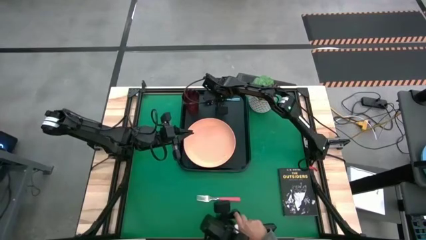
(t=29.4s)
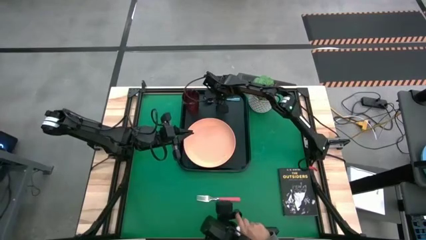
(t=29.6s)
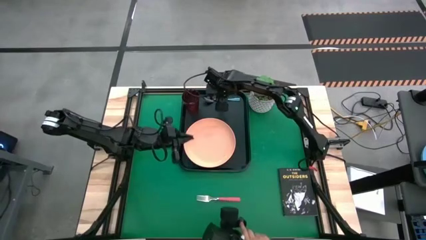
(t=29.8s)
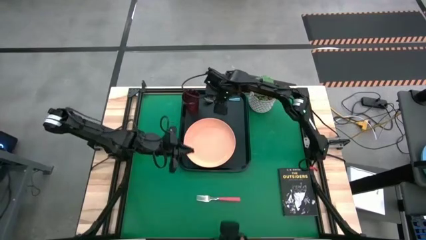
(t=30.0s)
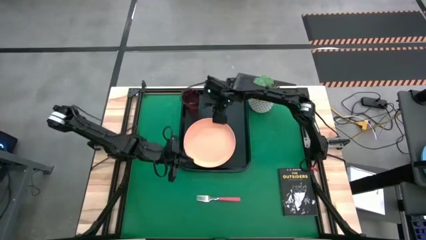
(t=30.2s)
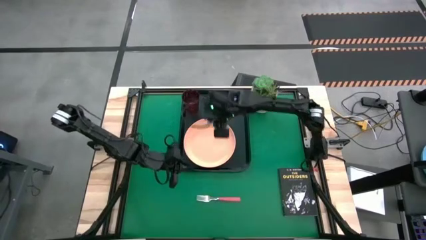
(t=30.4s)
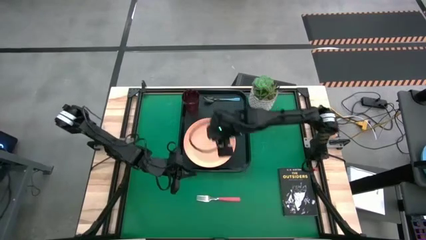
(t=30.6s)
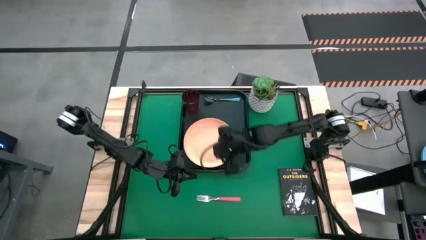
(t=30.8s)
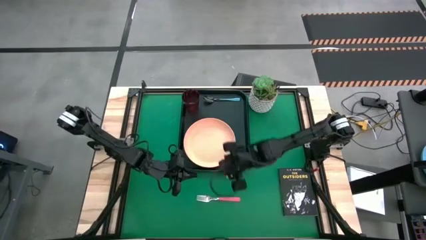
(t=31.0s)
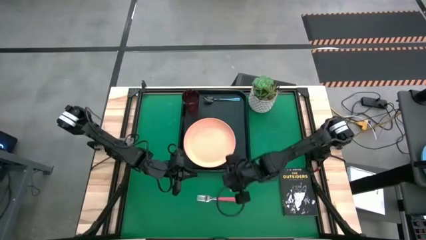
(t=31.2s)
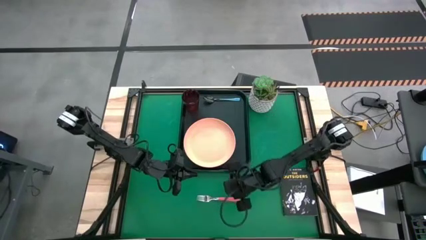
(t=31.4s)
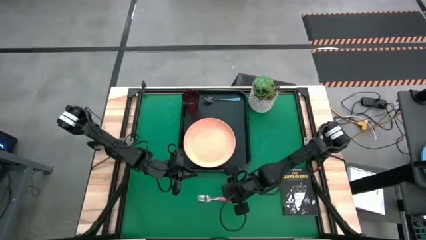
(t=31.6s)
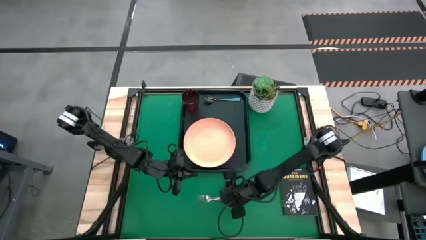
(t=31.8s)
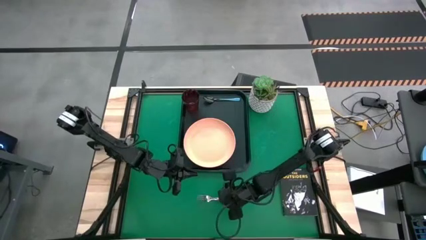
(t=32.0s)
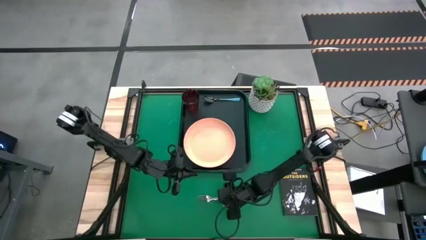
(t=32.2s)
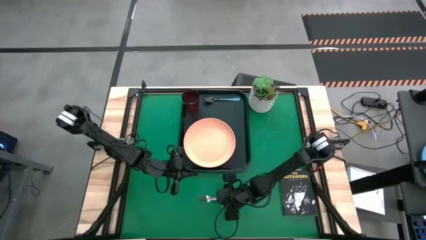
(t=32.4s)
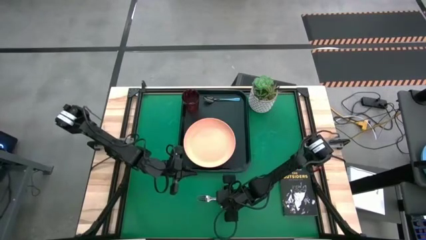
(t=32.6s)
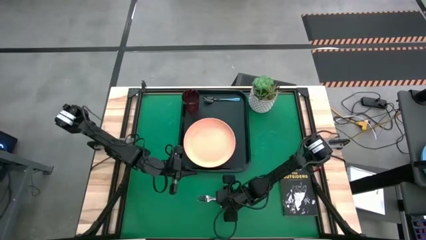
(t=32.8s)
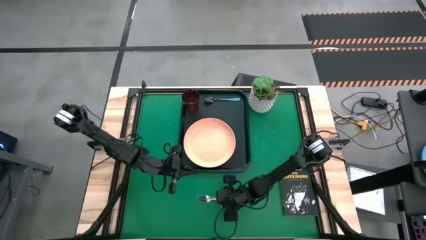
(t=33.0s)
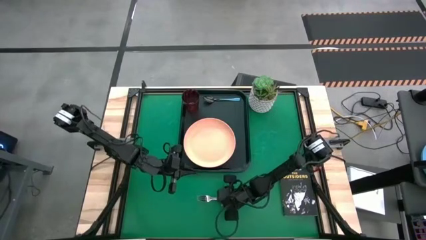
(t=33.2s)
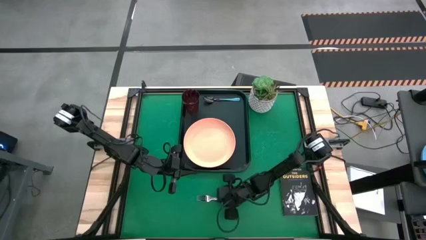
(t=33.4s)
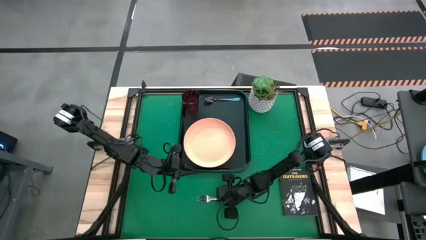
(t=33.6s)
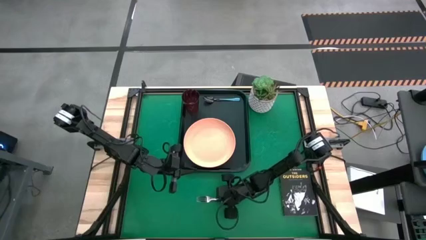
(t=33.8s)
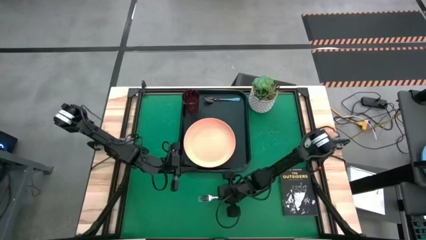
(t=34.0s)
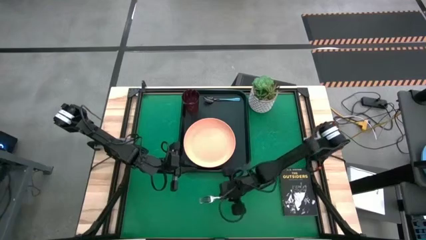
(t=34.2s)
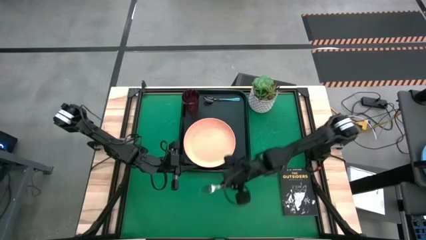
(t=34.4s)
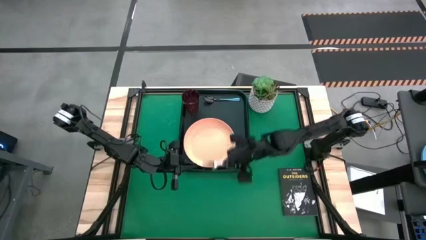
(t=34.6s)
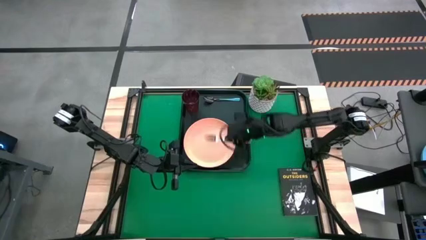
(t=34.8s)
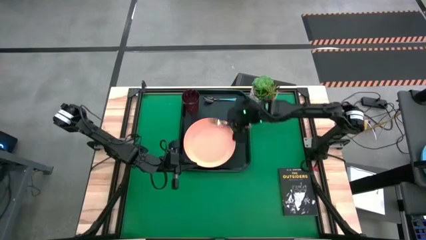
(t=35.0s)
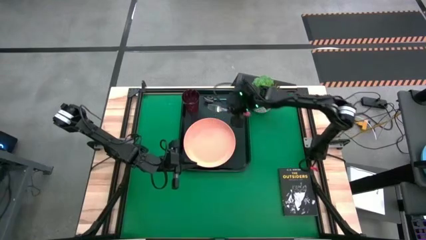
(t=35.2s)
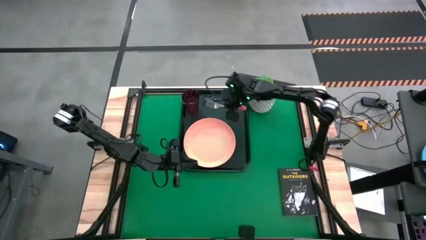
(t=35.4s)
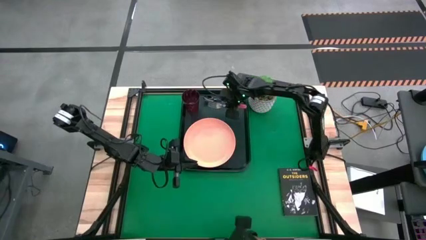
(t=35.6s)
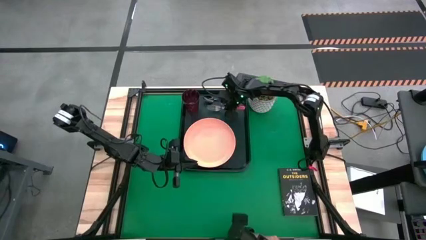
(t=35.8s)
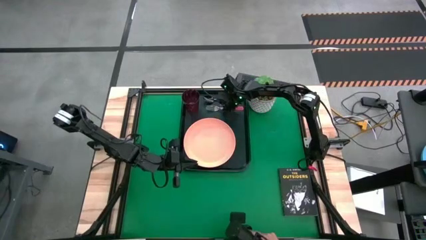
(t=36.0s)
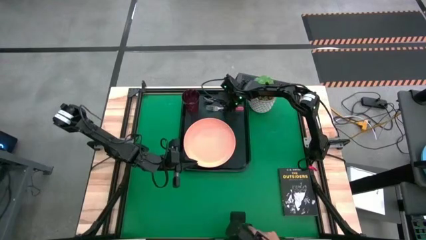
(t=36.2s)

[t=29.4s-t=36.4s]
Task: Pick and place plate/cup/fork/spoon on tray
Put the pink fork on the top of the black tray

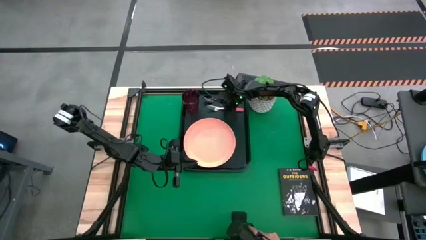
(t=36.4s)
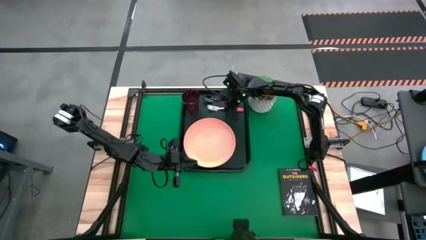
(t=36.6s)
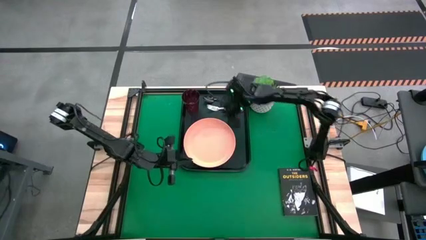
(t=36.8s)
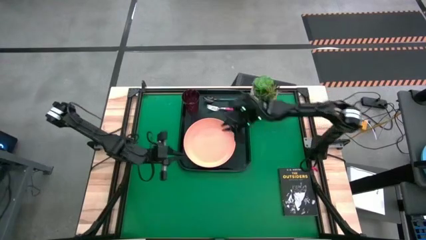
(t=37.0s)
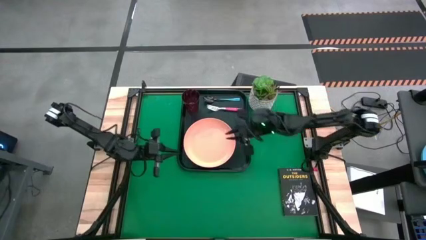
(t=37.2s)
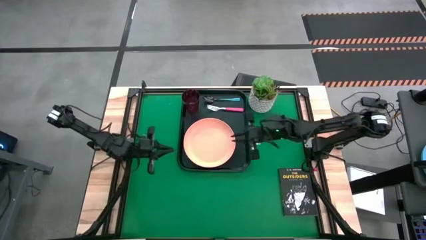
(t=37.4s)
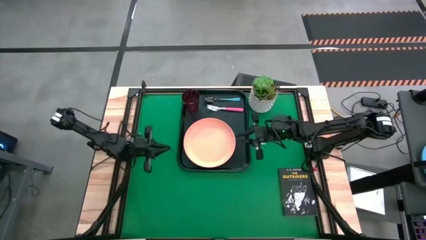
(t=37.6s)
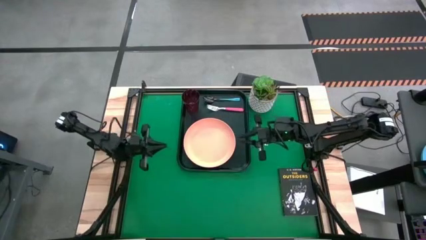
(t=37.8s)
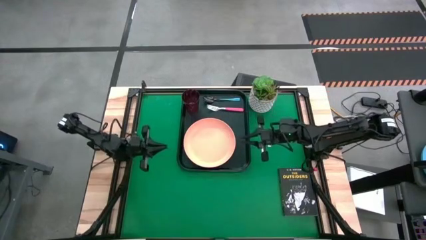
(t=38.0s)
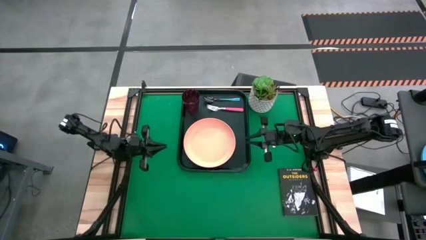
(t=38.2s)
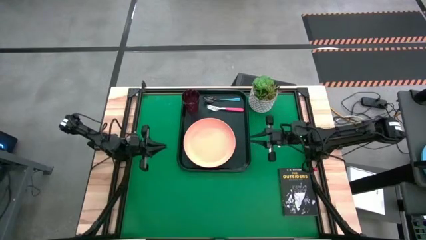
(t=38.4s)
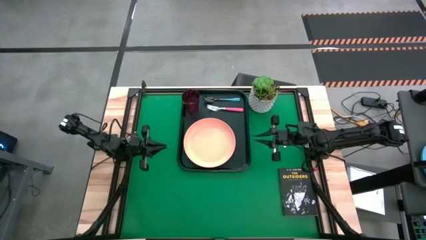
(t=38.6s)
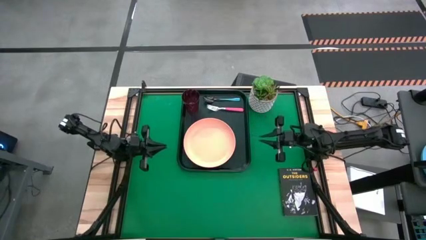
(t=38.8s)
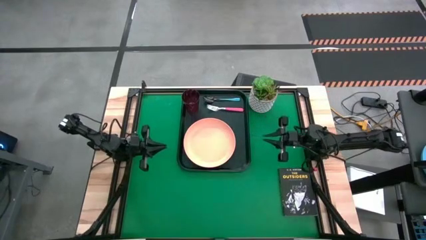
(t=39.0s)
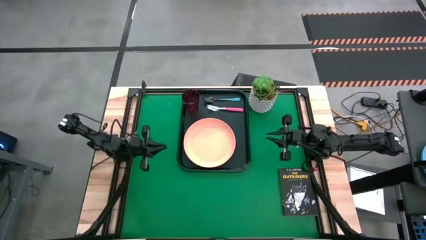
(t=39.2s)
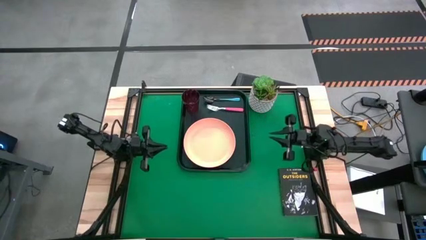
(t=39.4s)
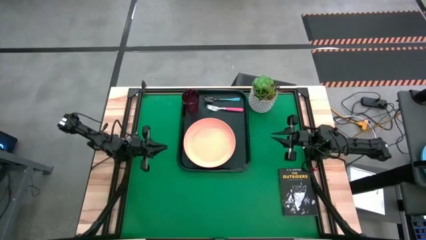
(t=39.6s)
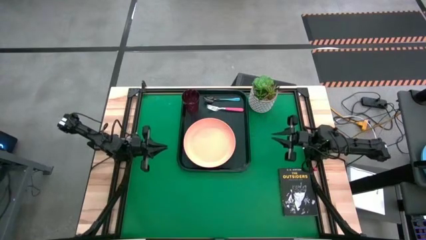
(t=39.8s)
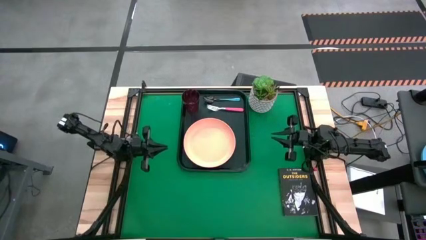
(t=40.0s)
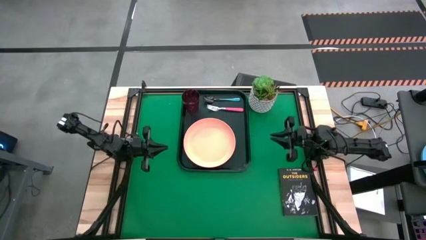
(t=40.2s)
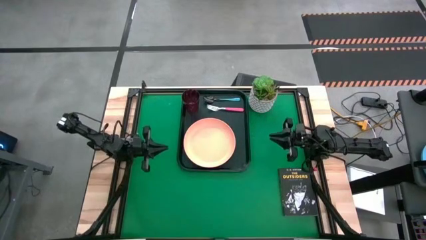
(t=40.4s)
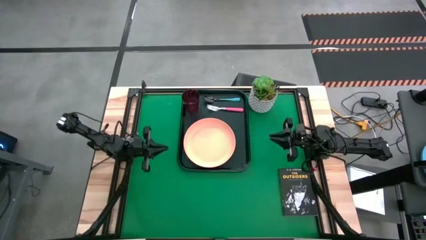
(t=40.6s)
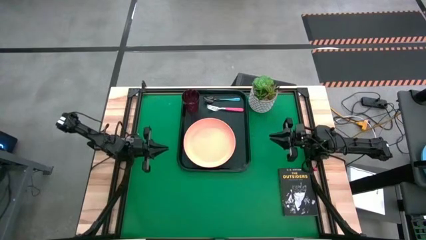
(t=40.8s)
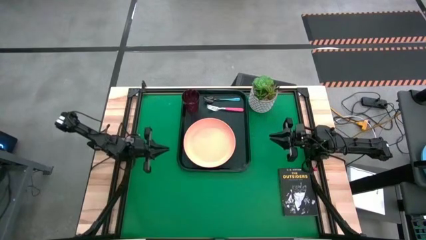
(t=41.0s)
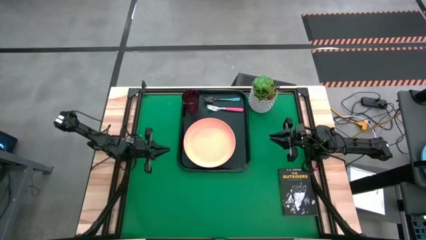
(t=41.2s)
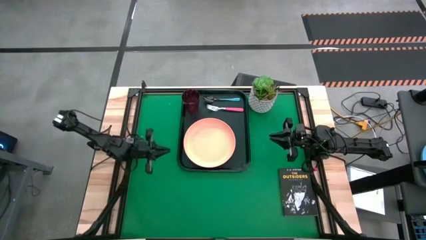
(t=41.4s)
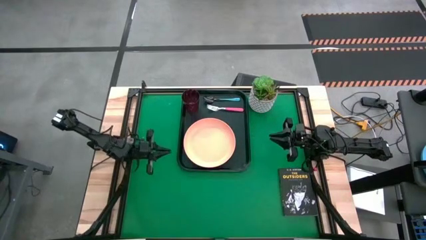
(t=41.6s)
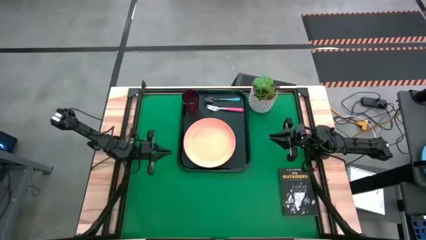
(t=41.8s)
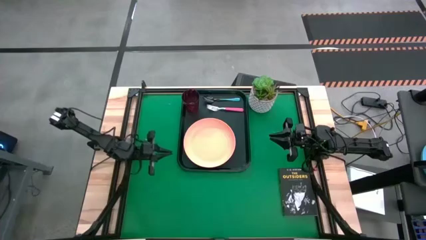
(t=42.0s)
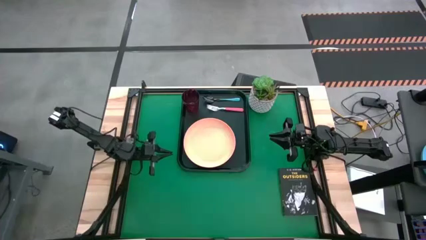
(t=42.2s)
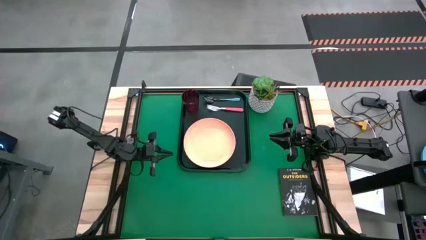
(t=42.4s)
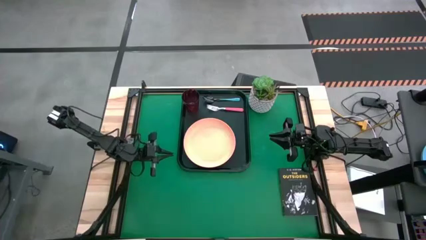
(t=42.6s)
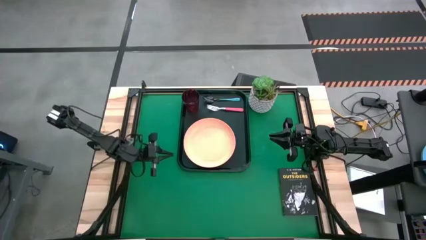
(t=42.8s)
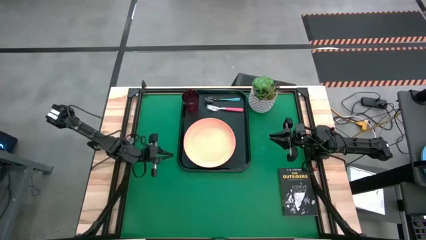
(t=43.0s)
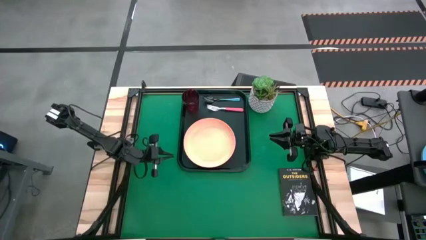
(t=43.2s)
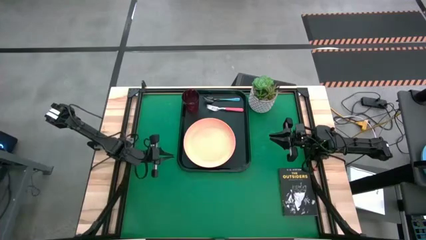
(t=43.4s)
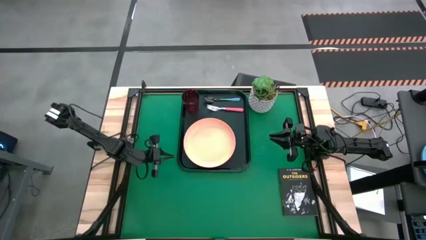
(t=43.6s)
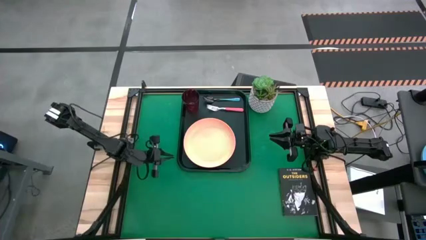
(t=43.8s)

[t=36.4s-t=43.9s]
Return to Home Position

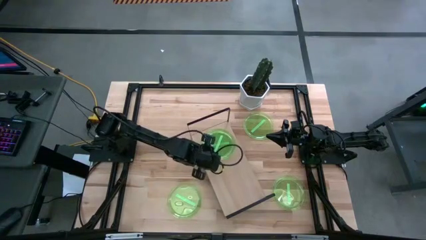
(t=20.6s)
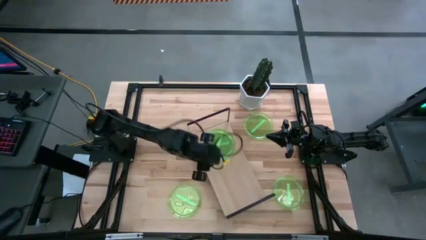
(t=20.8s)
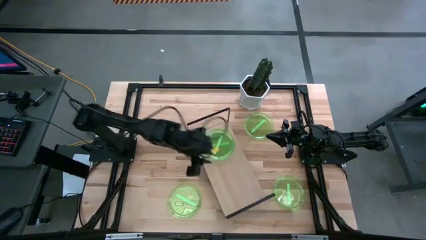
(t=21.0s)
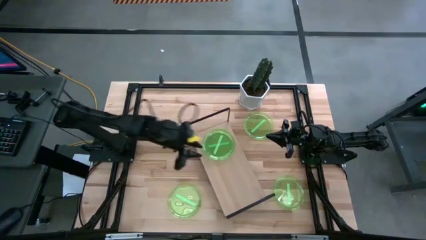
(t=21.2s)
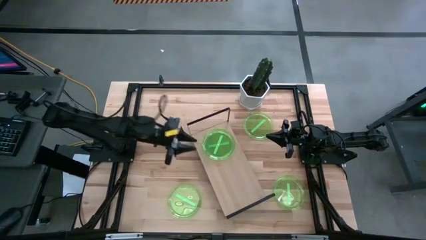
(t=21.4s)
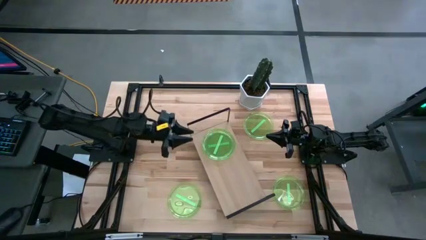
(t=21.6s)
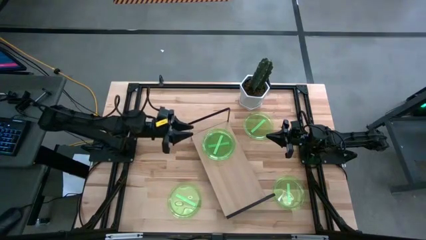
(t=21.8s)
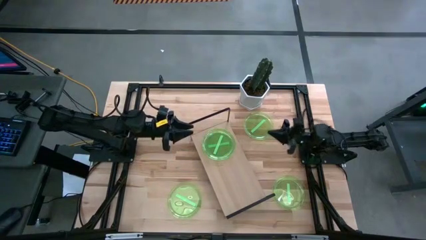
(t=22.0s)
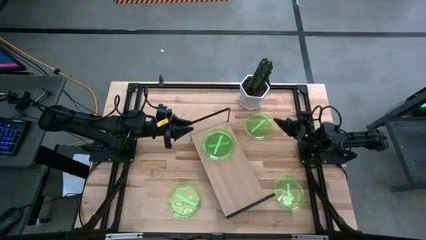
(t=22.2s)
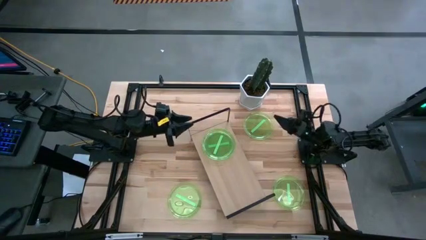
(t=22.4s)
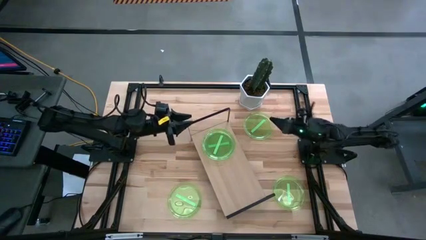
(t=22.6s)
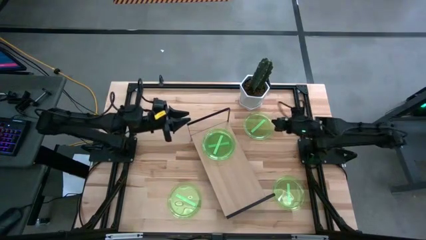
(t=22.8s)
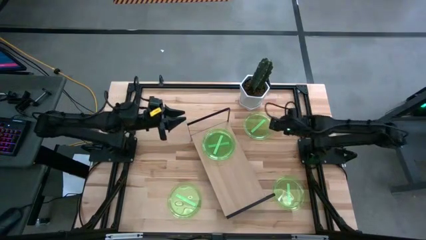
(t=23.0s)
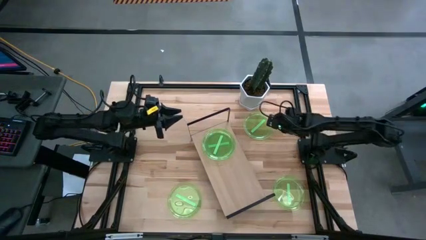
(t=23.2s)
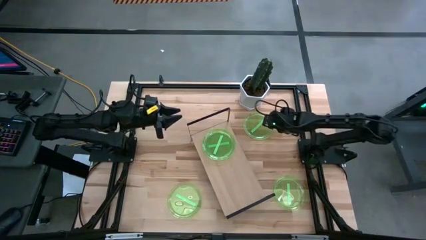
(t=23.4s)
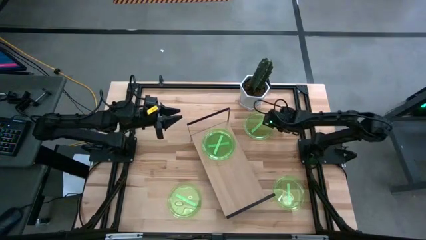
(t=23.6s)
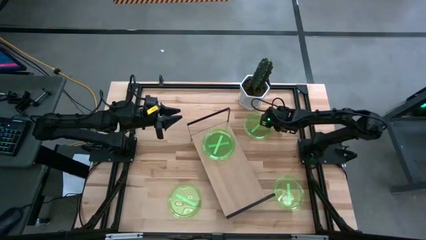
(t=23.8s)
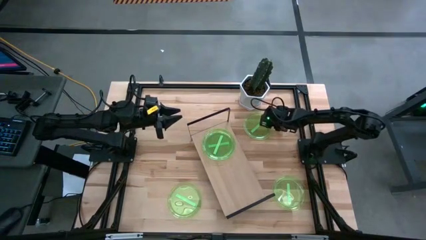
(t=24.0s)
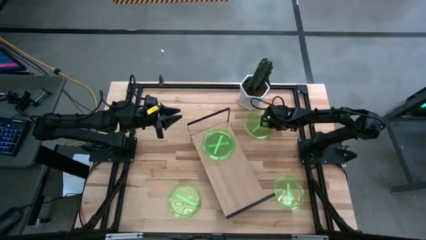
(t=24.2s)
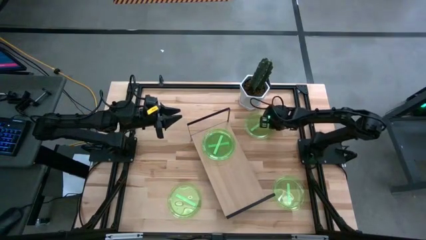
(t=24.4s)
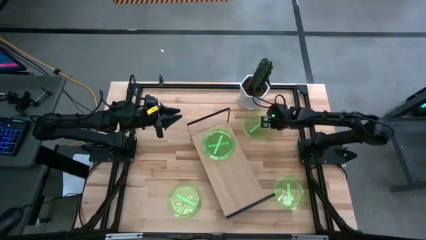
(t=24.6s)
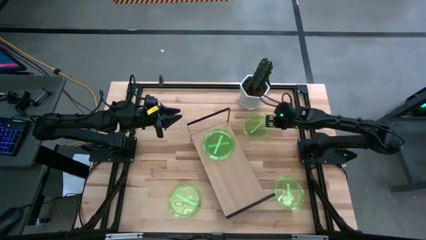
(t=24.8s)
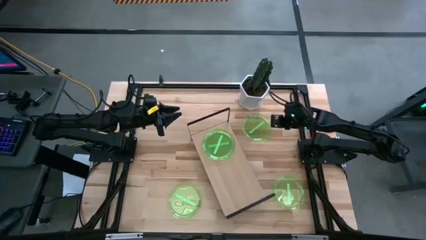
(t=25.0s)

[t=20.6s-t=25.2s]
Task: Place and stack plates onto a shelf
Stack the top green plate on top of the green plate on the shelf
